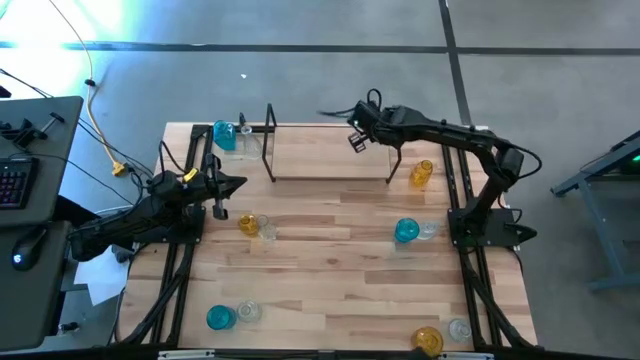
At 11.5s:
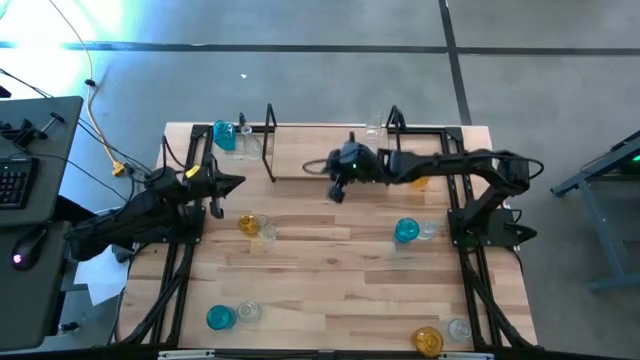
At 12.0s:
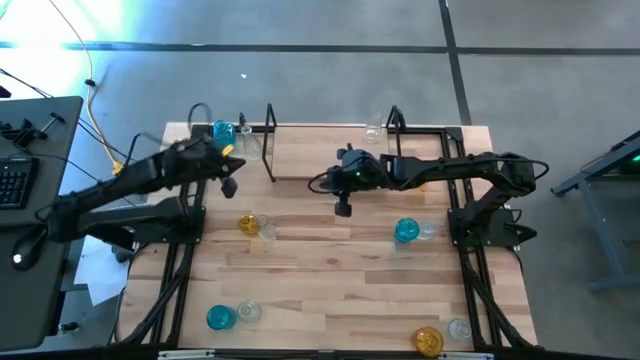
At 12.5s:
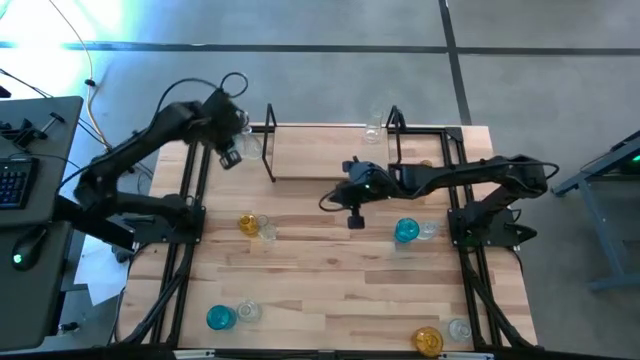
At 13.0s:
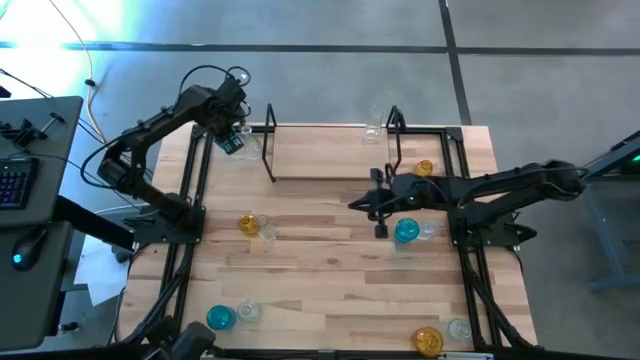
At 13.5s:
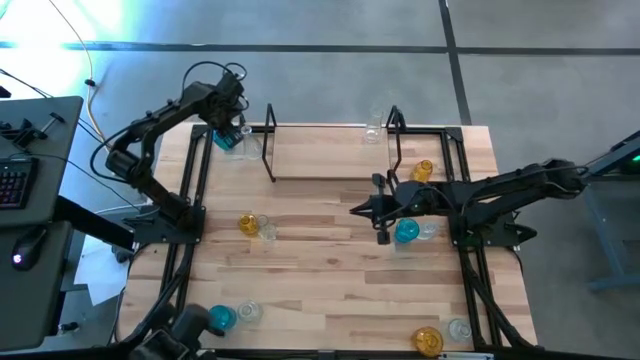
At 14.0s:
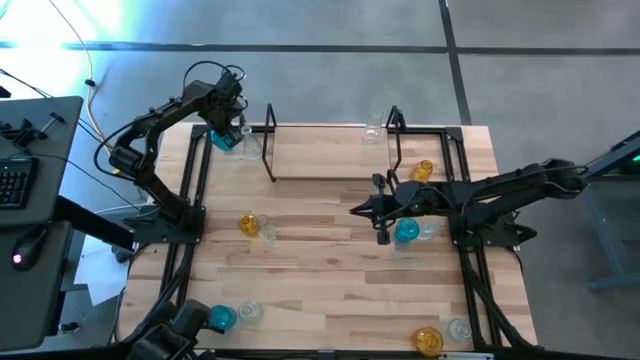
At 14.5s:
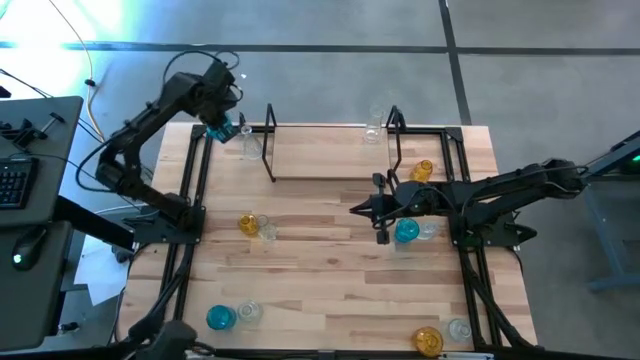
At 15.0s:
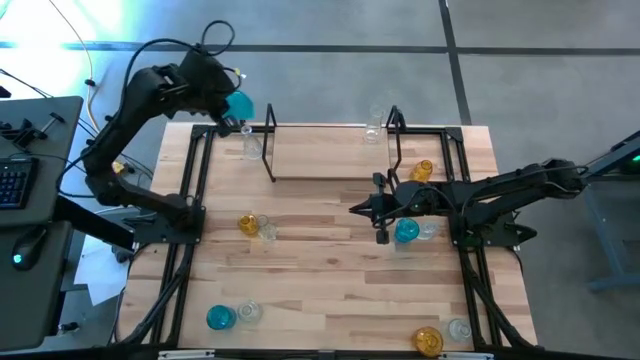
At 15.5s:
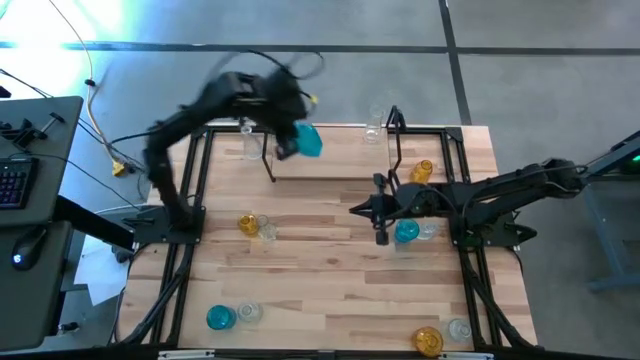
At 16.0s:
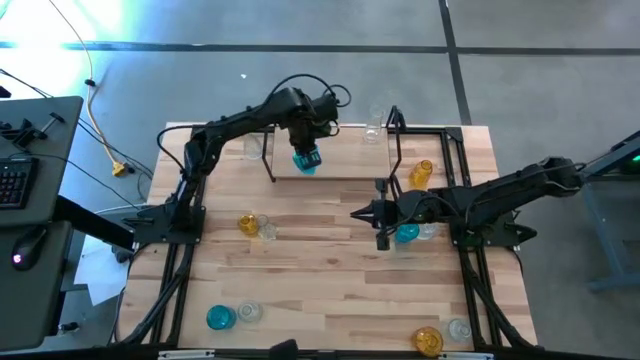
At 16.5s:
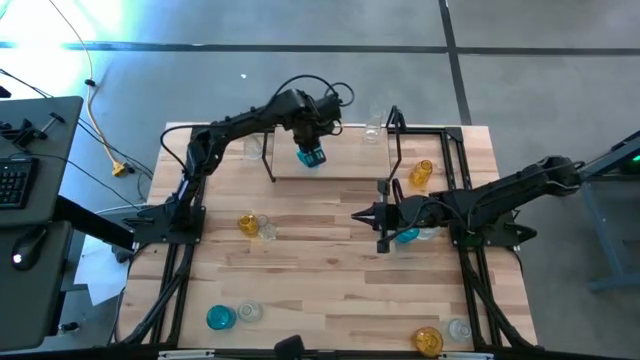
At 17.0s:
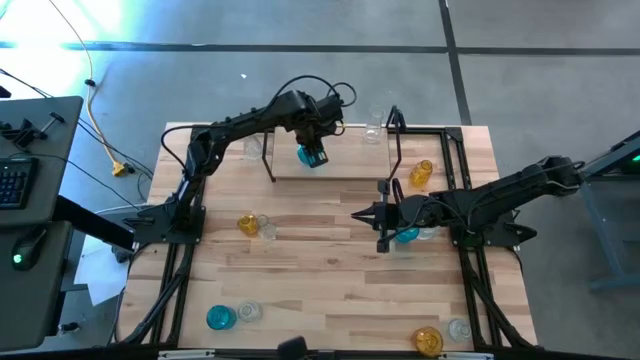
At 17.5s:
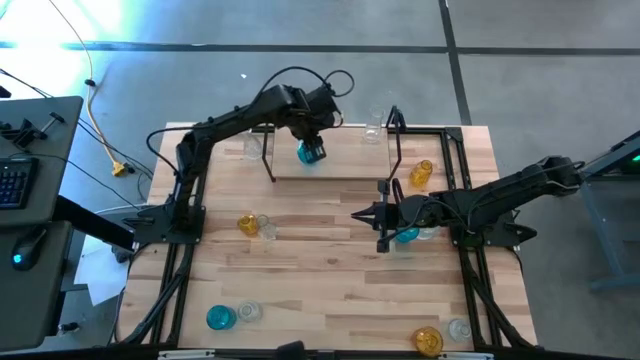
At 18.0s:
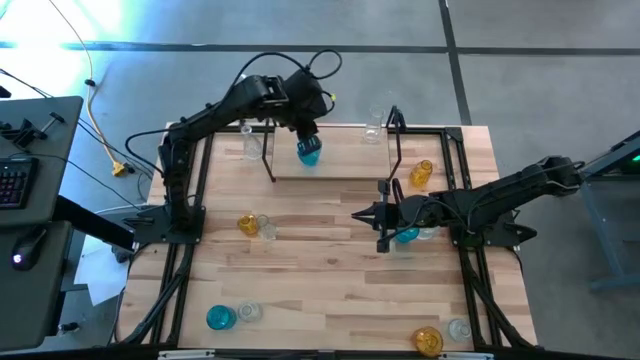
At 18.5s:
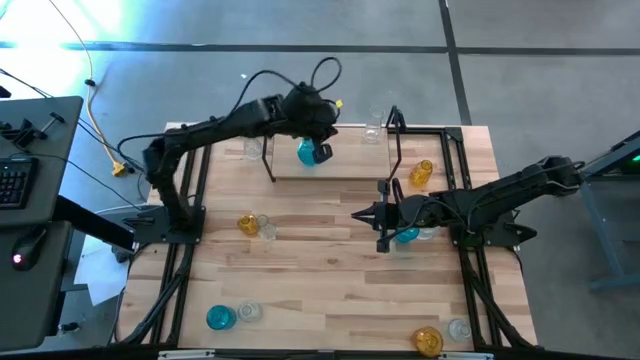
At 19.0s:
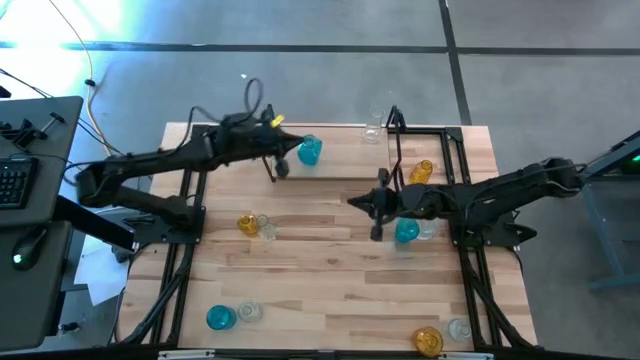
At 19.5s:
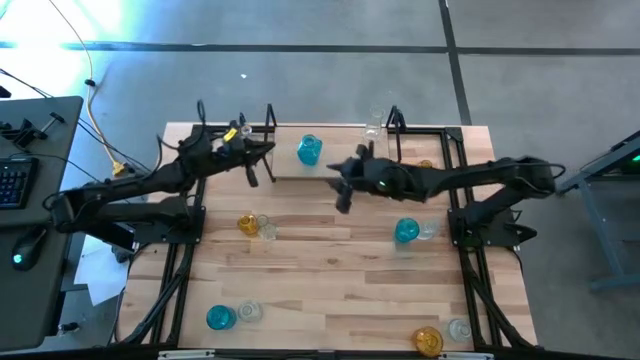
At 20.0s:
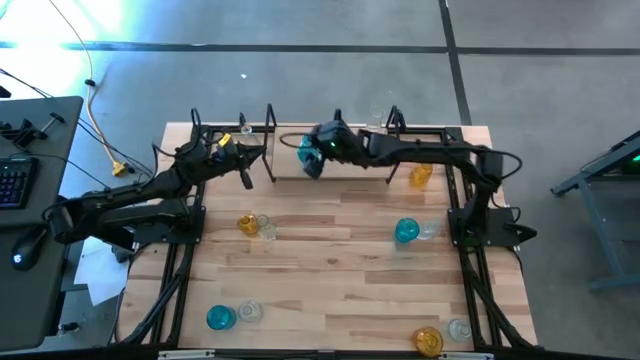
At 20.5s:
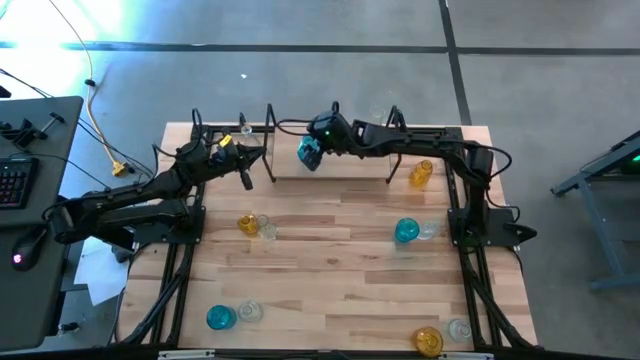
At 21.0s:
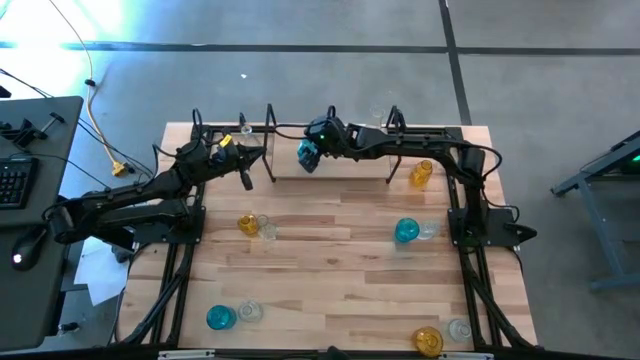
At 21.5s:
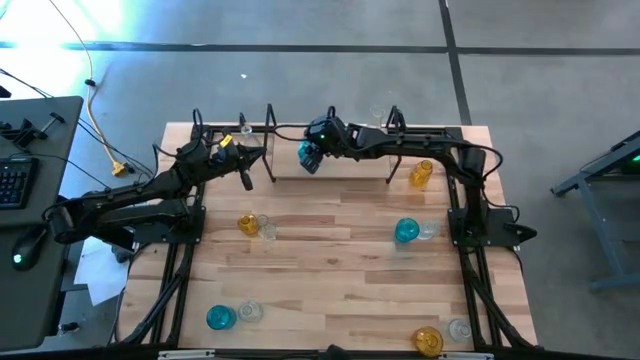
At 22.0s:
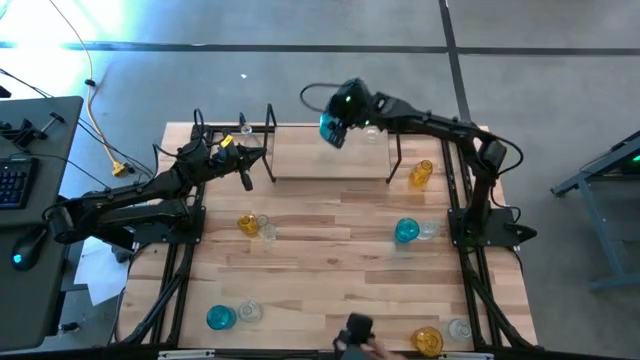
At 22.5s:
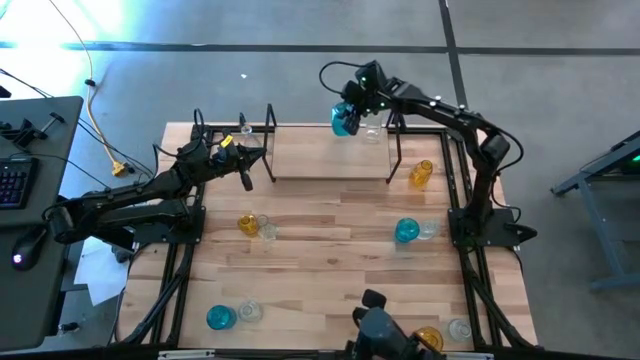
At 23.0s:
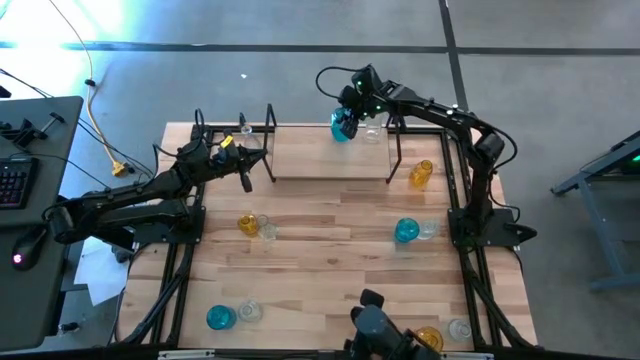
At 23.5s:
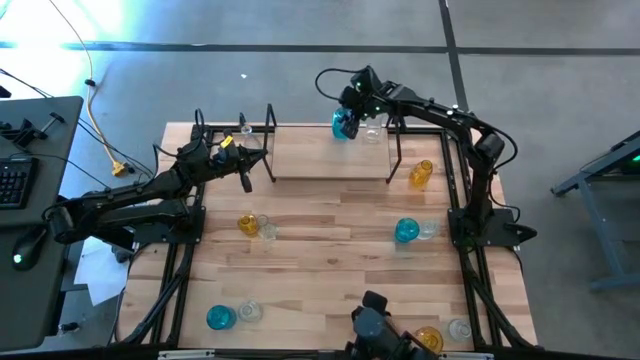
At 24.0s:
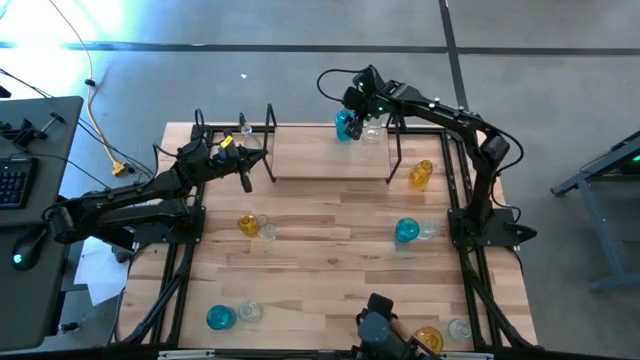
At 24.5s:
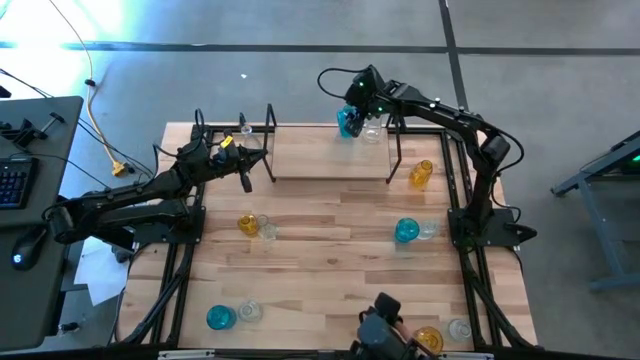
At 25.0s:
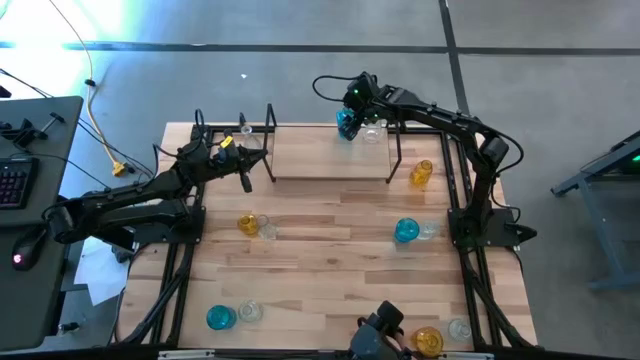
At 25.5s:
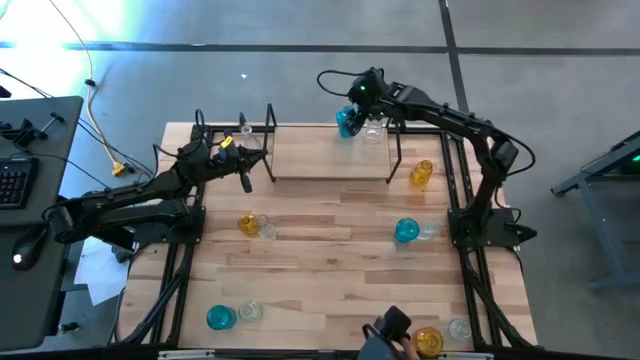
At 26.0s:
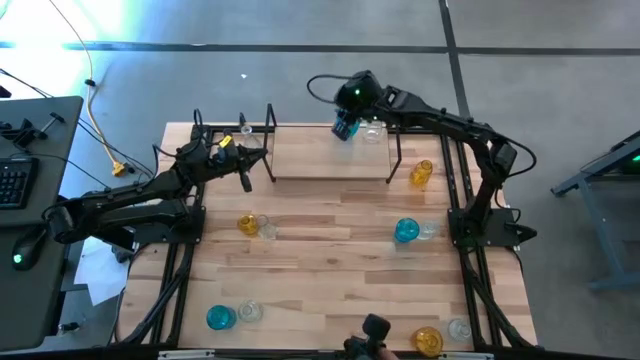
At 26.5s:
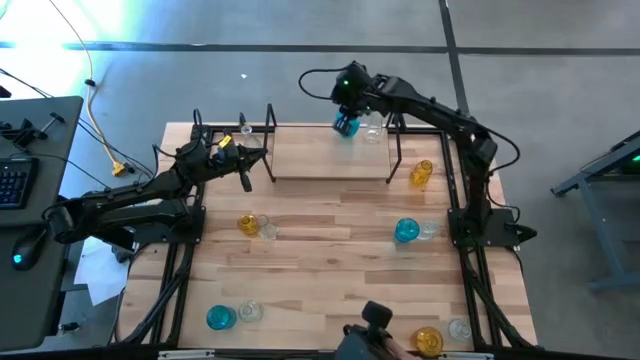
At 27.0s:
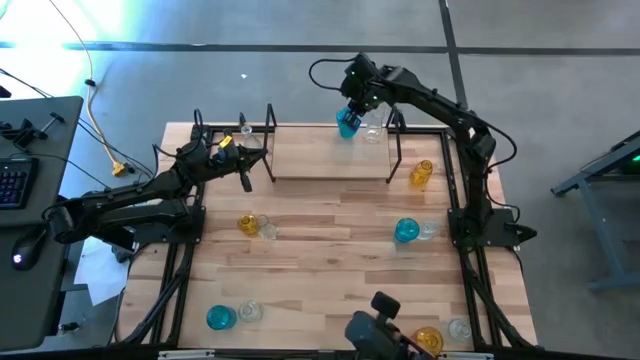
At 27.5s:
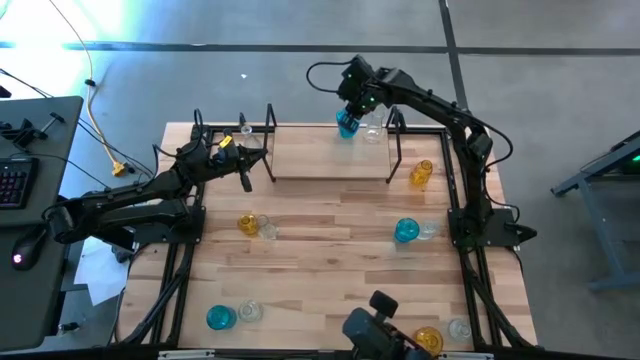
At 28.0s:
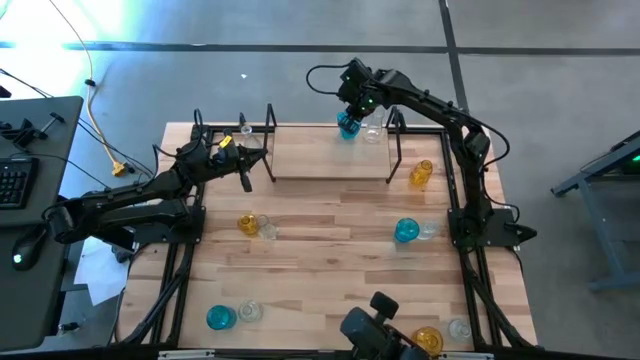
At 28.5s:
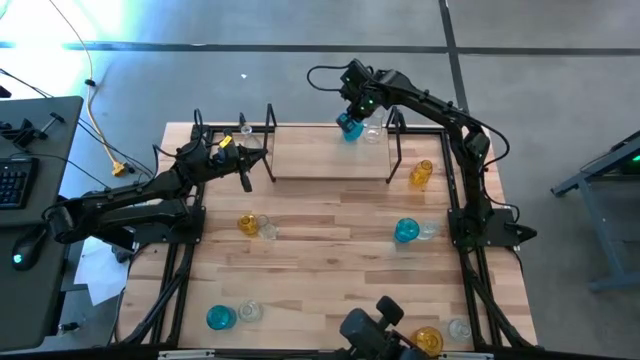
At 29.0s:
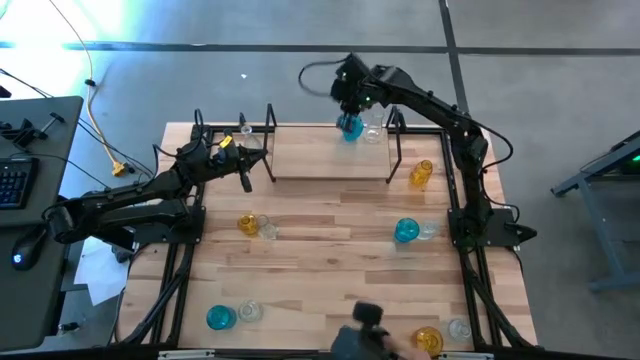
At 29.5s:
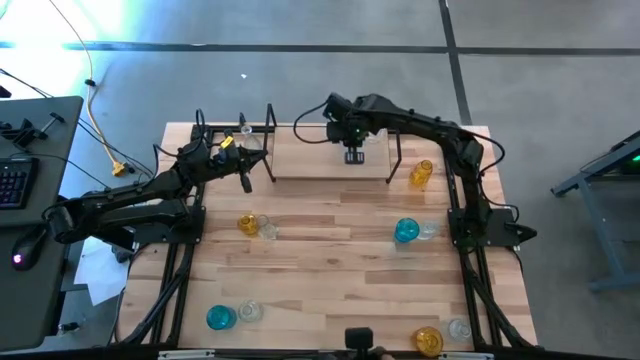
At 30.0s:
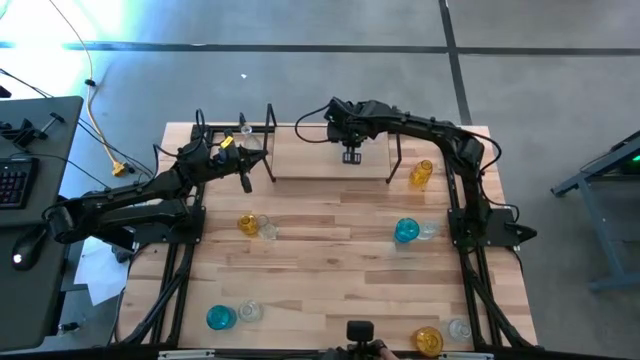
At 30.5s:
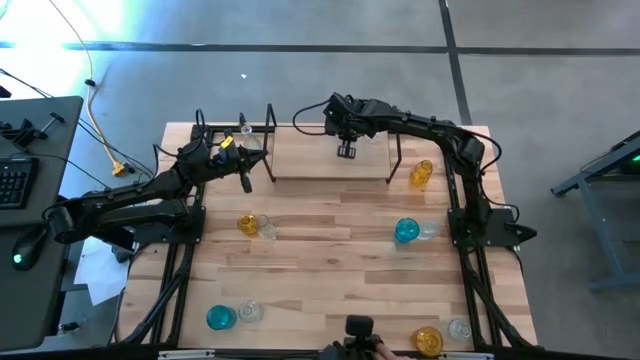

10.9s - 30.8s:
Task: sort vases onto shelf
Put the blue vase on the shelf
